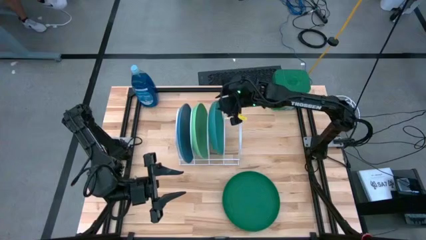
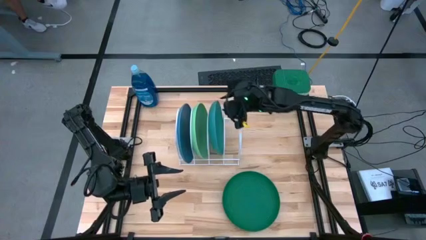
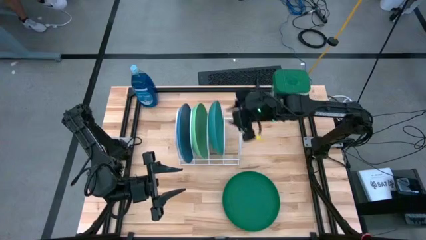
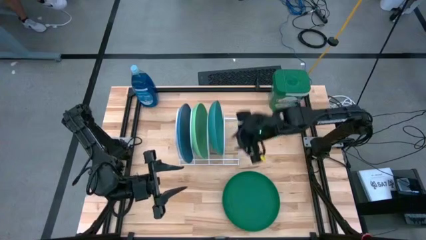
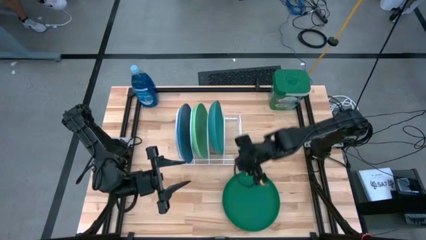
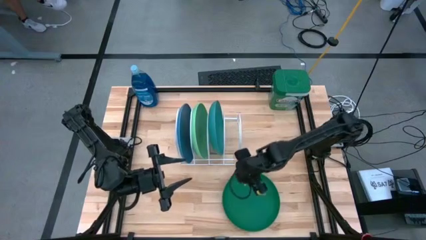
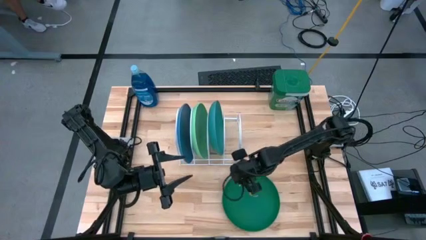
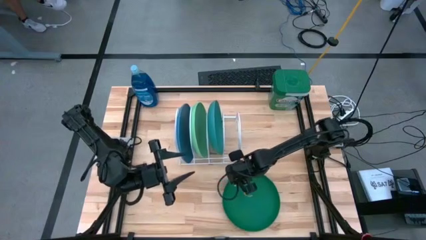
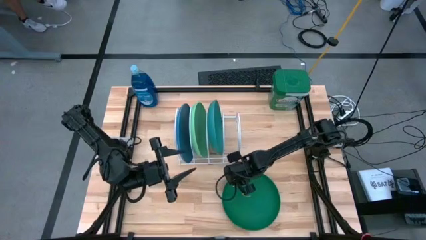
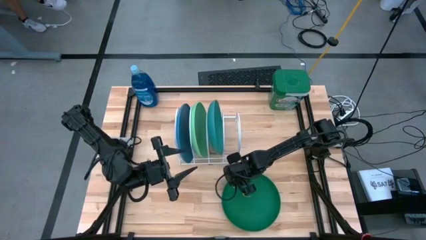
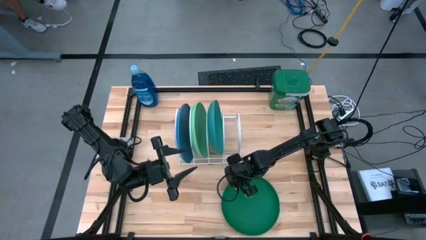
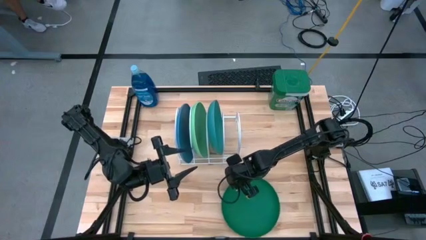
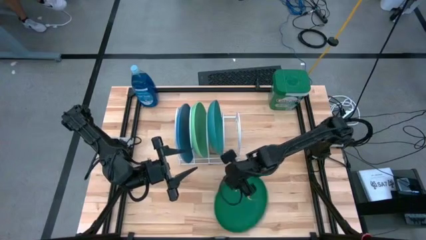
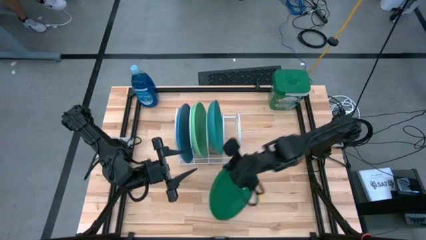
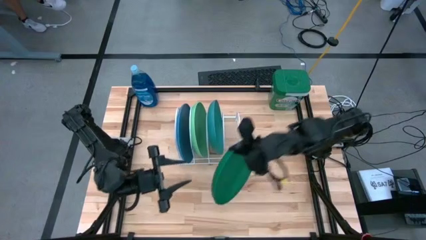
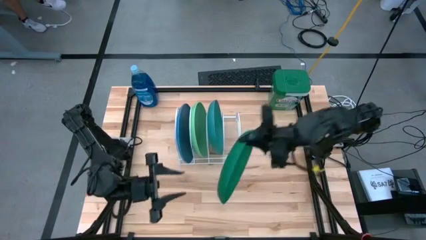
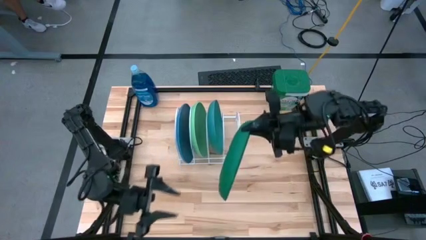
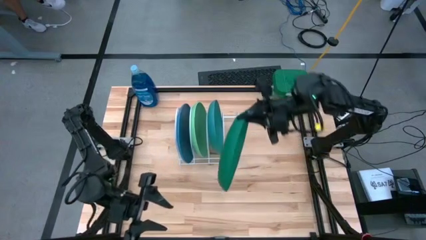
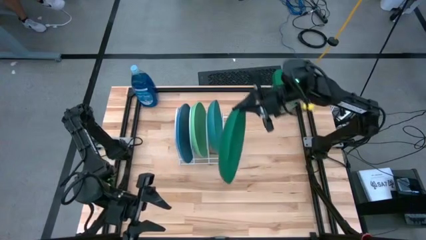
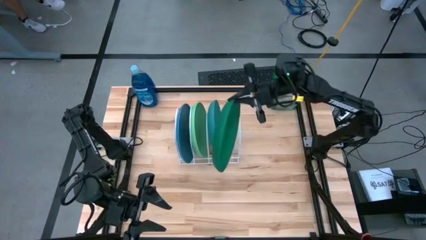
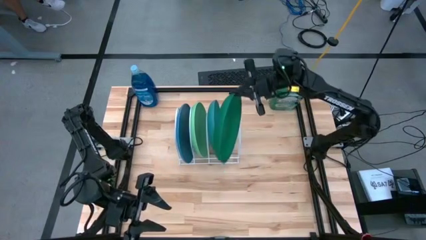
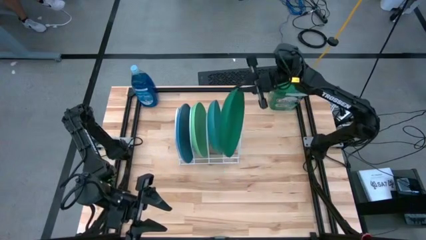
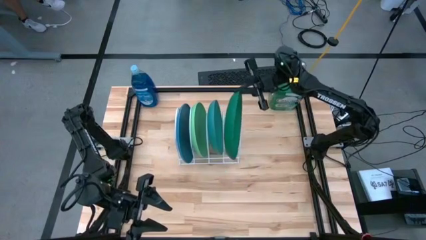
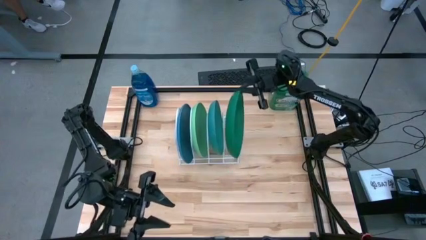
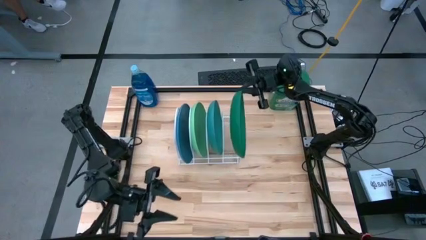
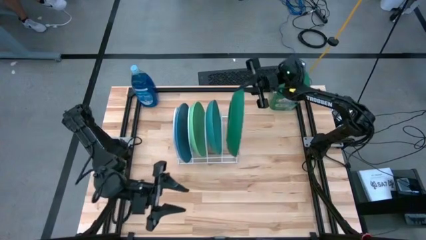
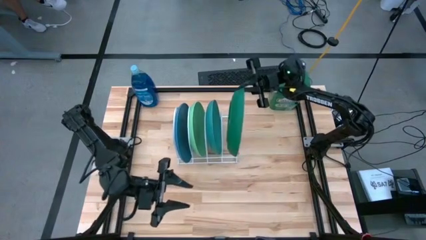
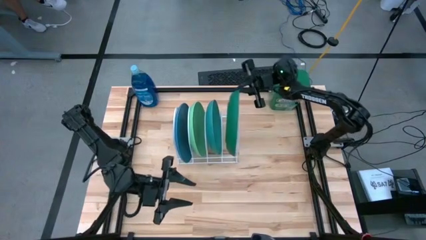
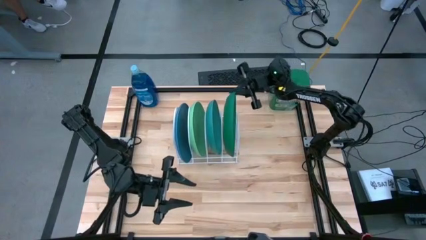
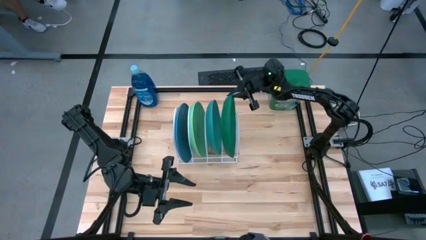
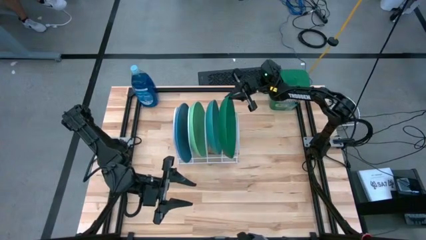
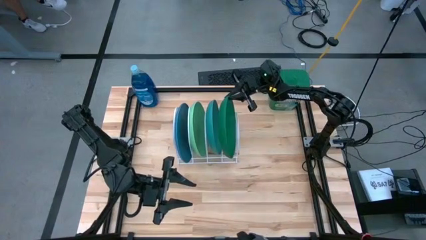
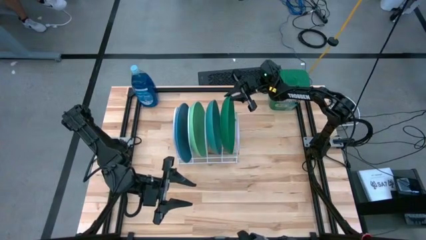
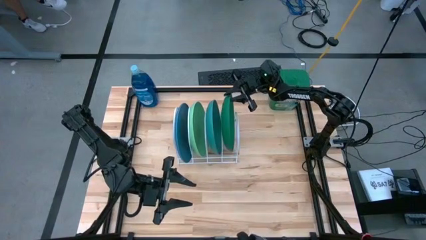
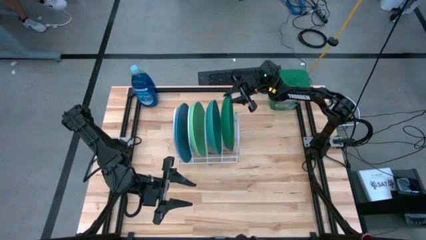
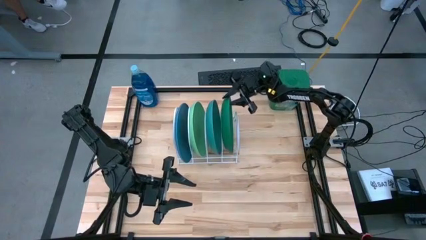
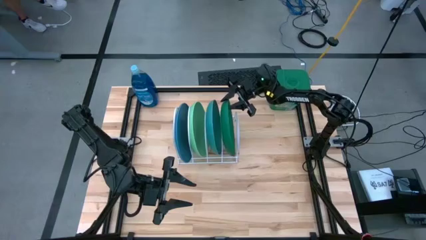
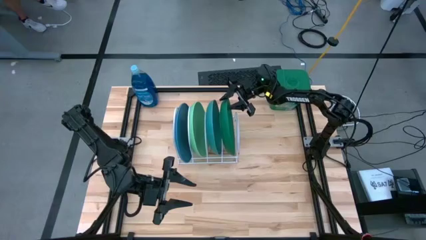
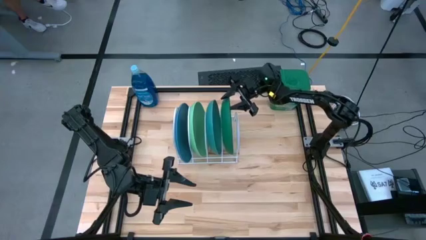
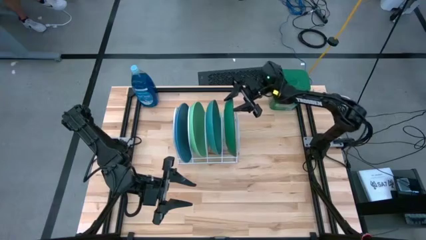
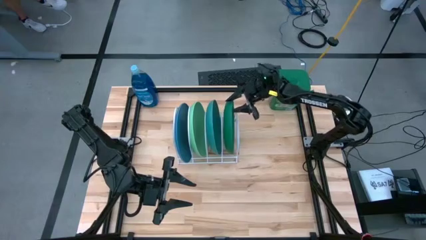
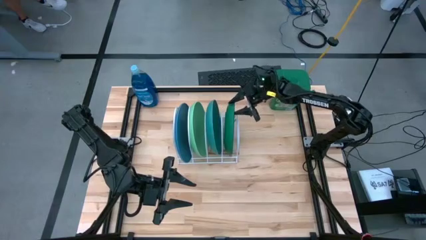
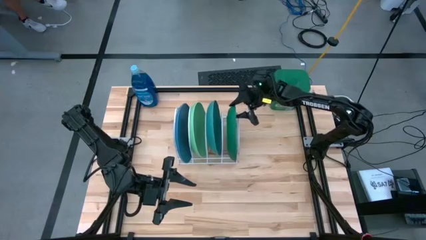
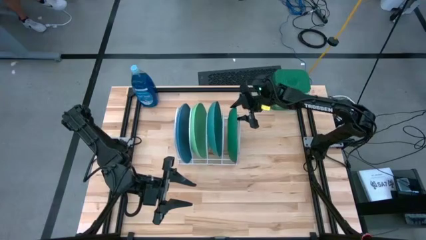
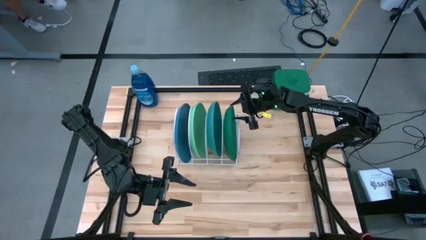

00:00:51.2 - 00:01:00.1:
Task: Sort dishes
Put the dark green plate in the dish rack

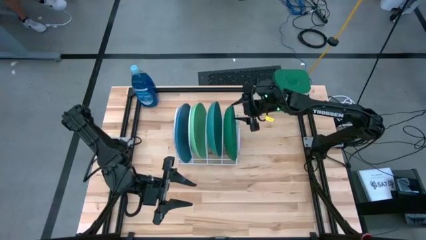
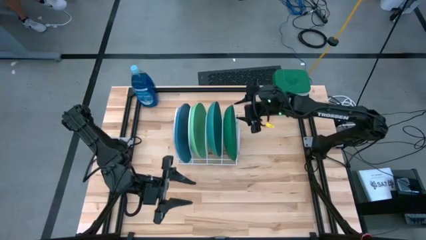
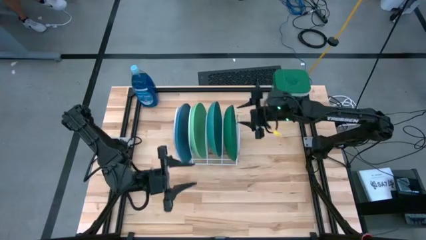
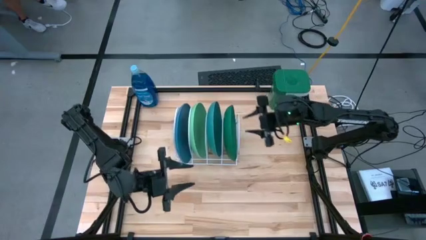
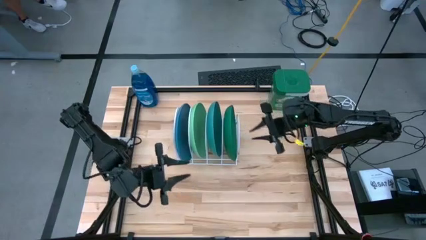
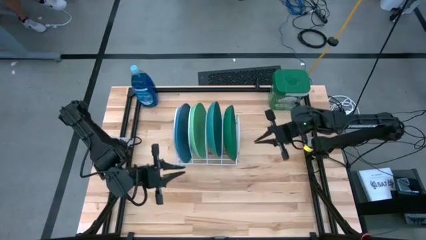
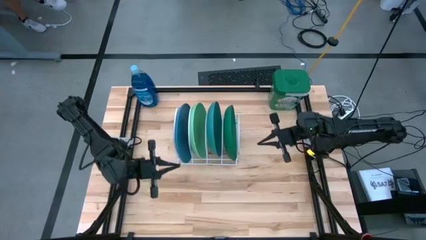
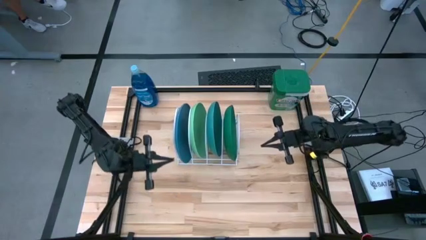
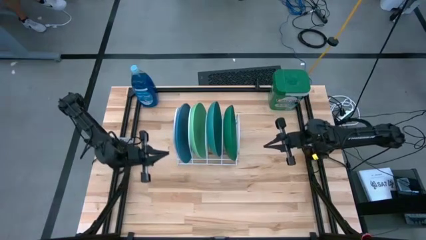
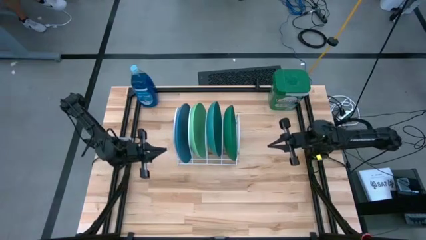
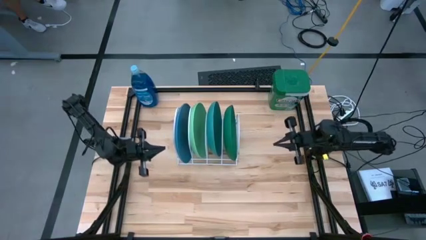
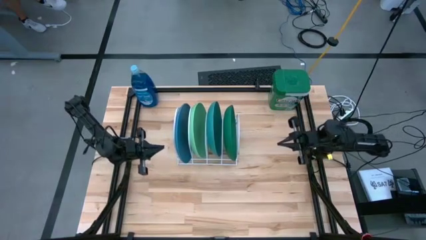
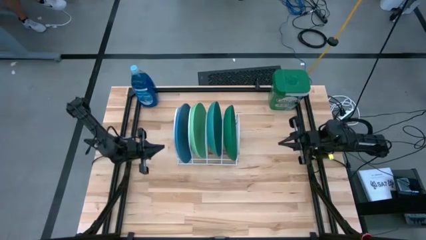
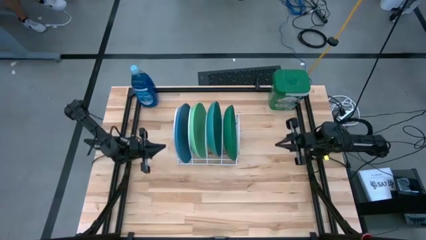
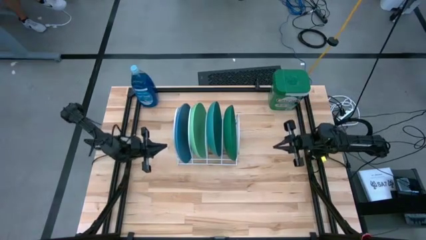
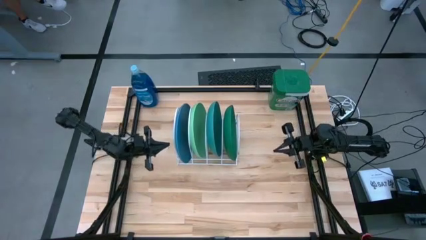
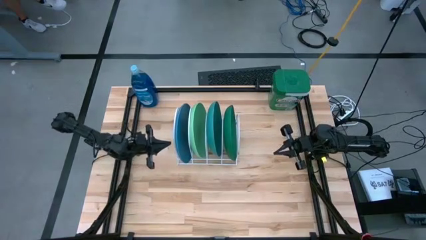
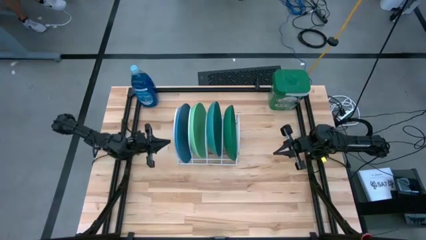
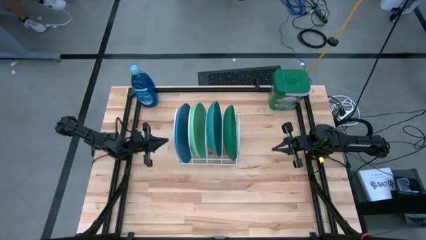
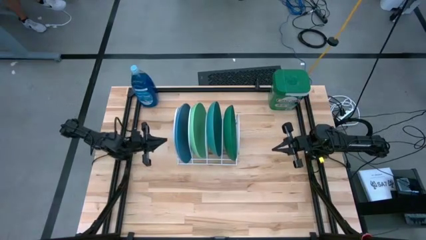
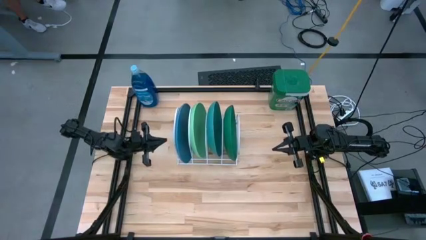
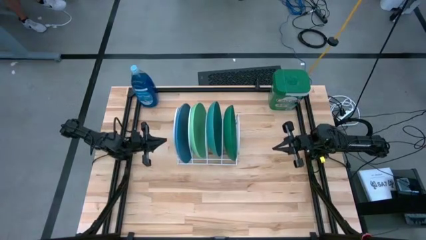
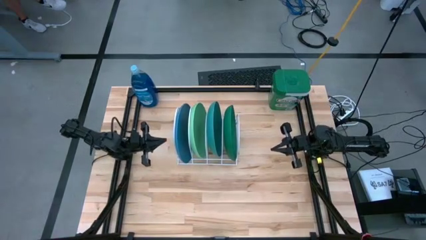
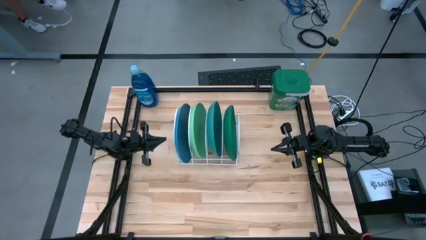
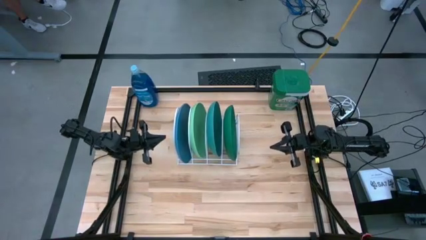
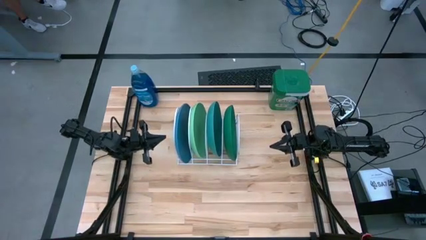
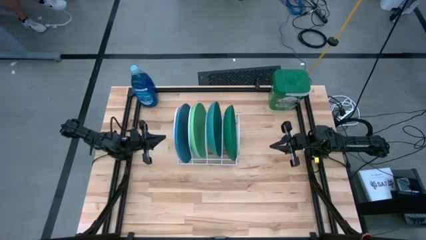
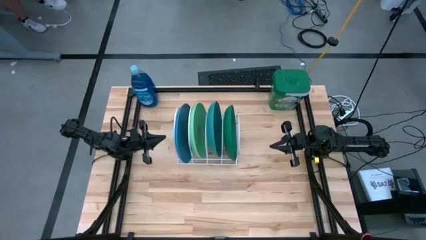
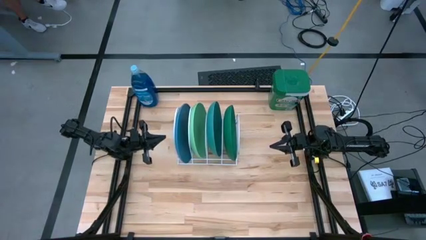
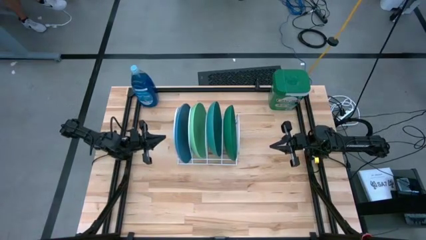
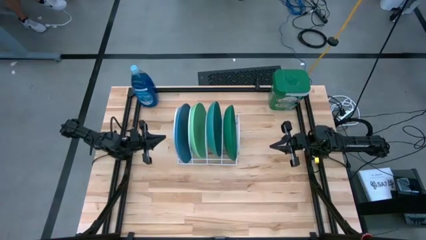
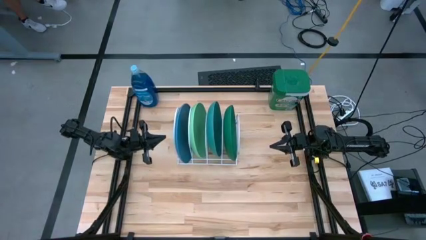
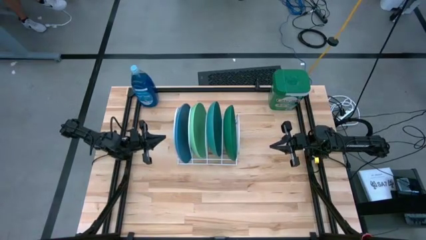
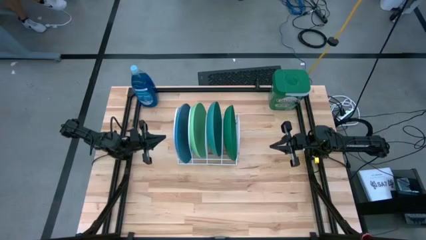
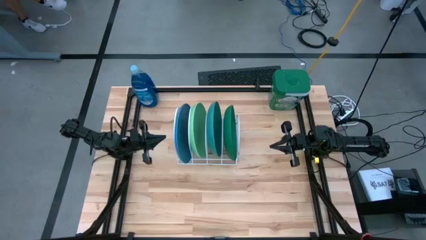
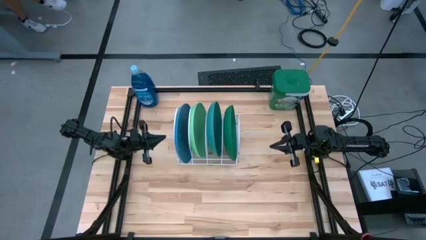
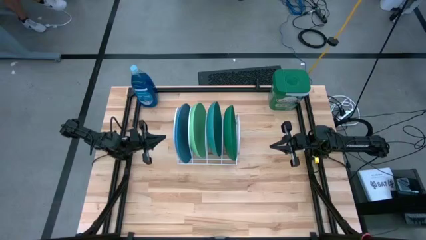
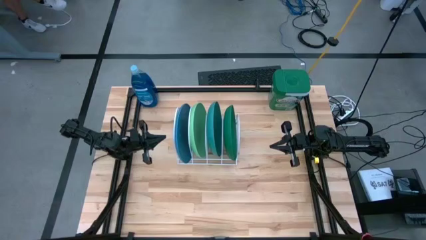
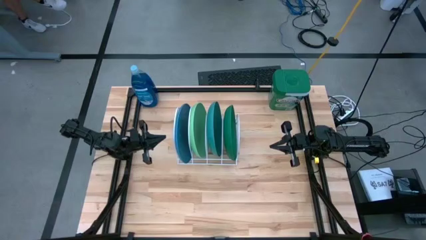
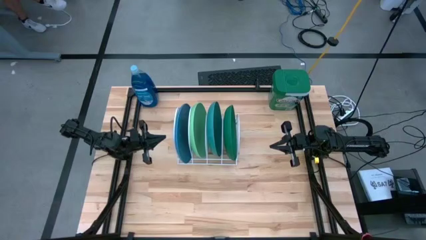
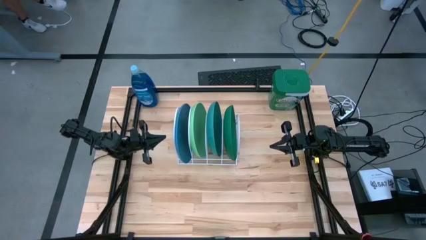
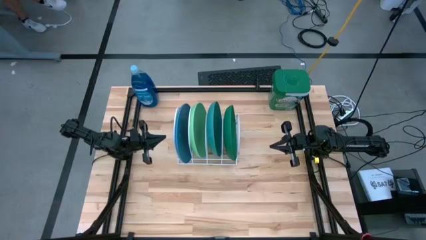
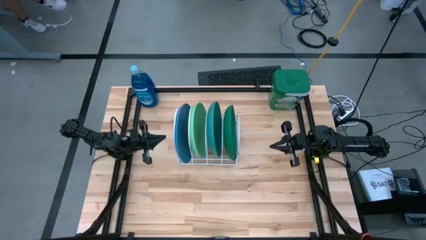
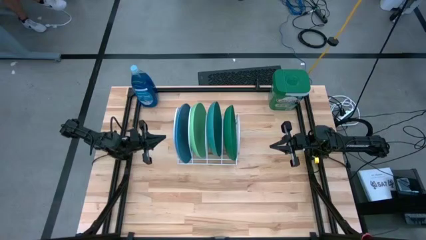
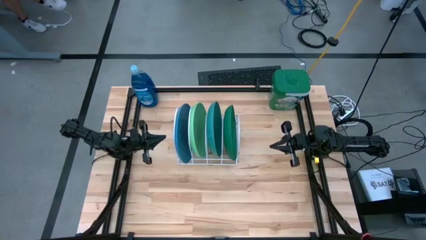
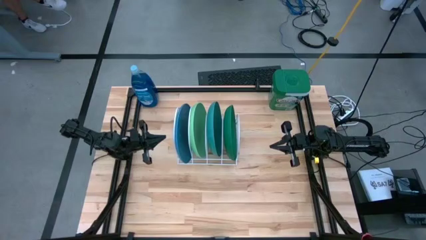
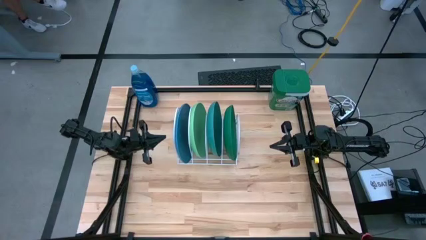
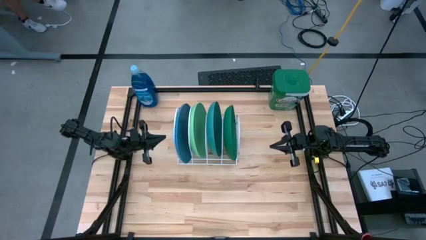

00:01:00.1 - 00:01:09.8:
Return to Home Position
